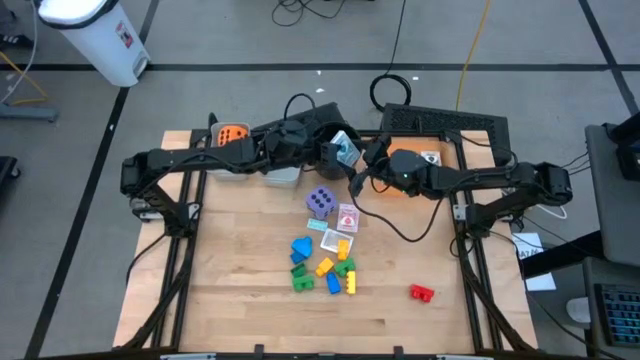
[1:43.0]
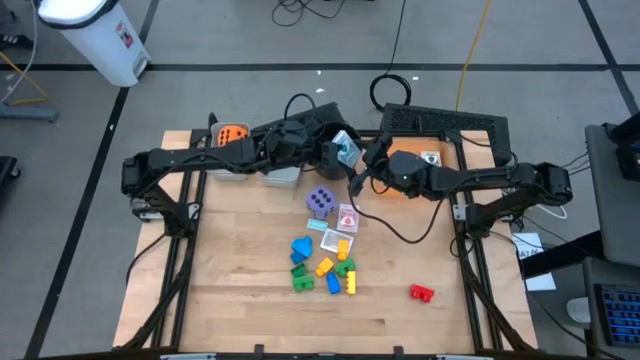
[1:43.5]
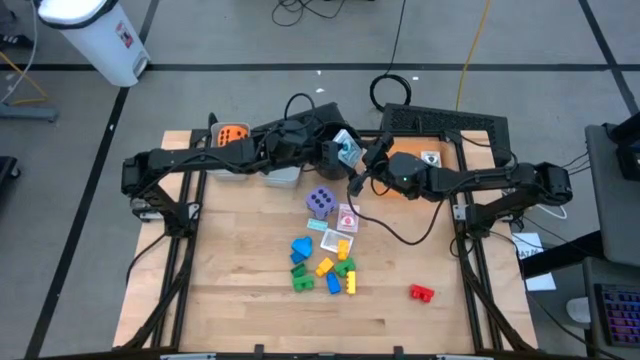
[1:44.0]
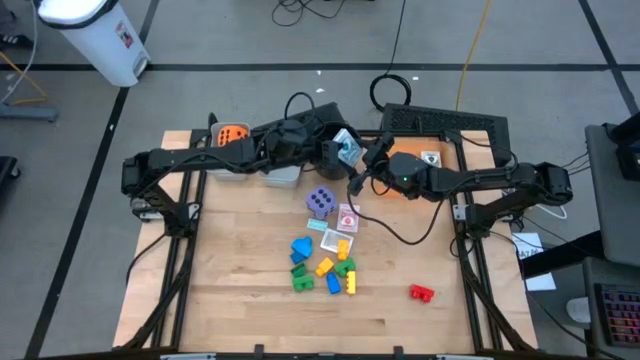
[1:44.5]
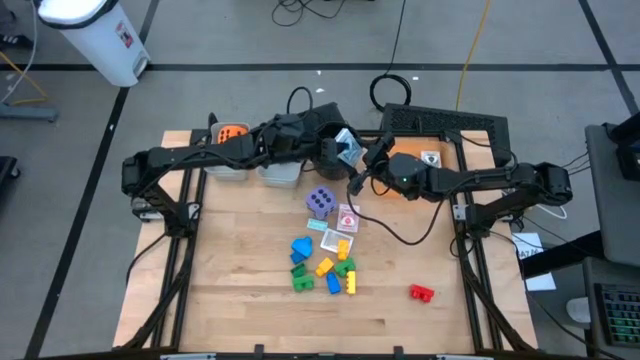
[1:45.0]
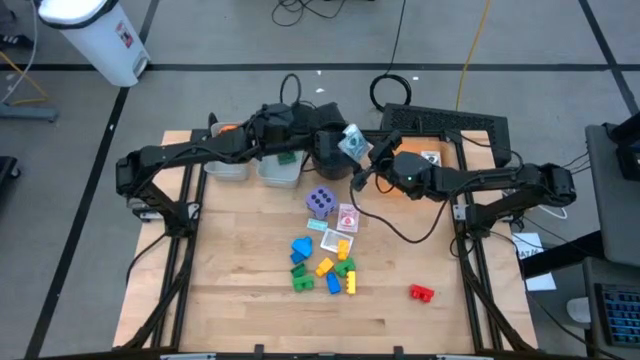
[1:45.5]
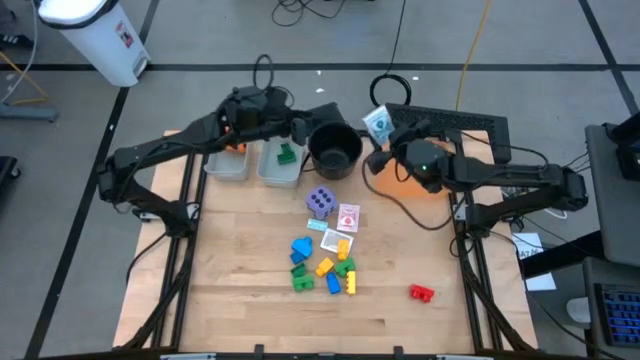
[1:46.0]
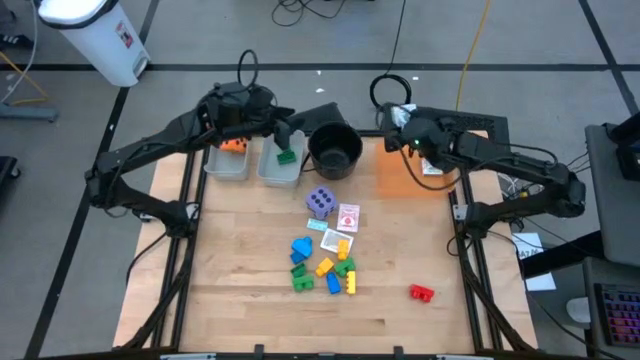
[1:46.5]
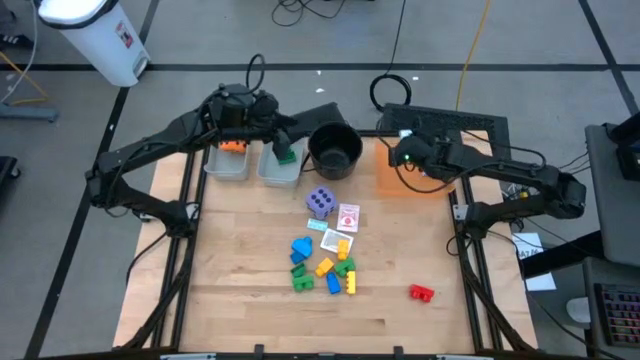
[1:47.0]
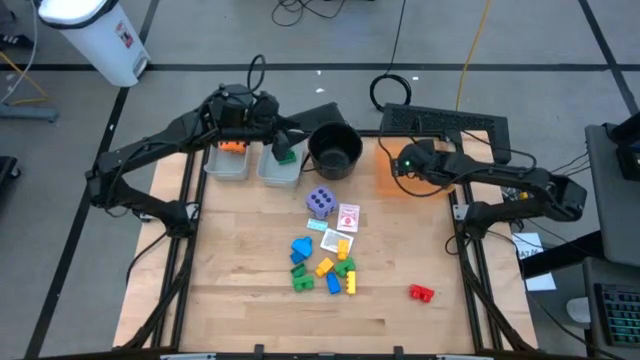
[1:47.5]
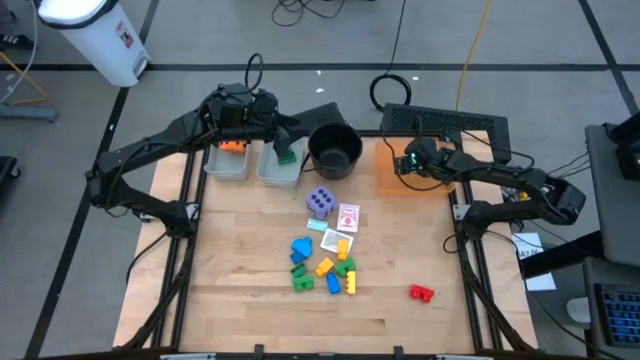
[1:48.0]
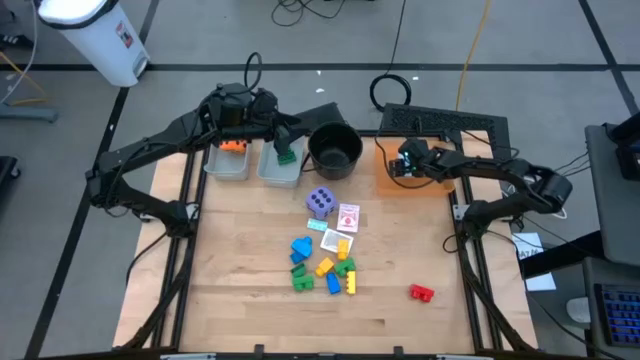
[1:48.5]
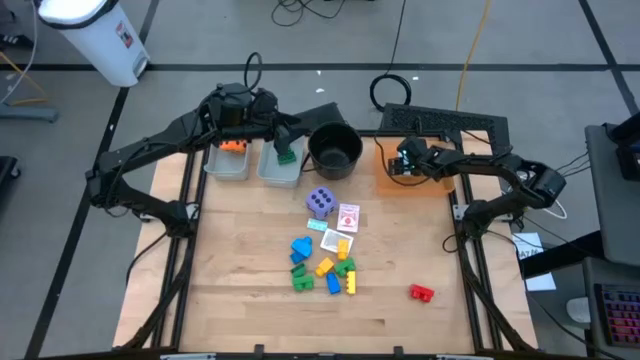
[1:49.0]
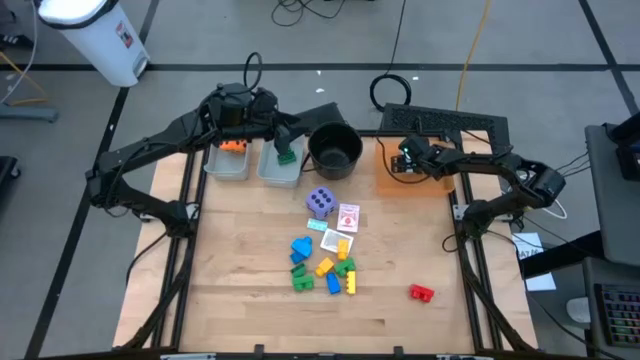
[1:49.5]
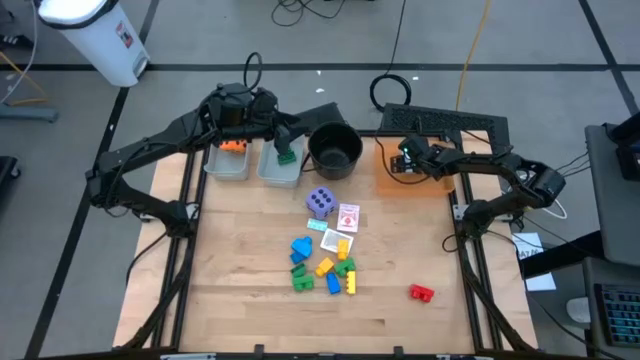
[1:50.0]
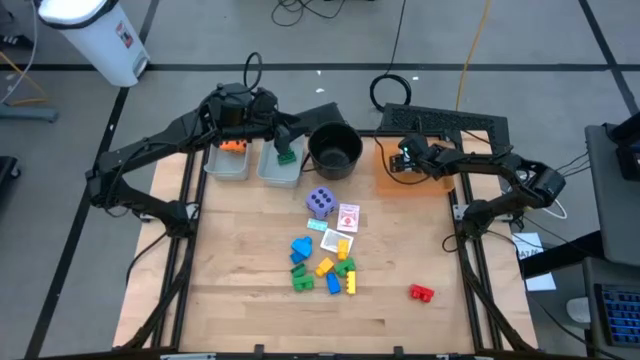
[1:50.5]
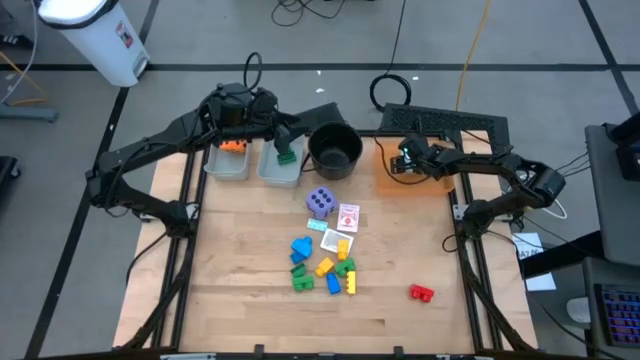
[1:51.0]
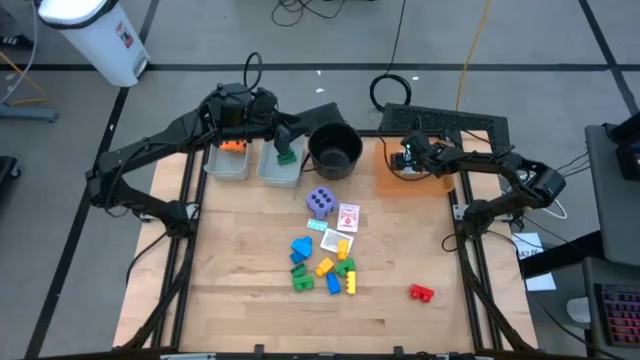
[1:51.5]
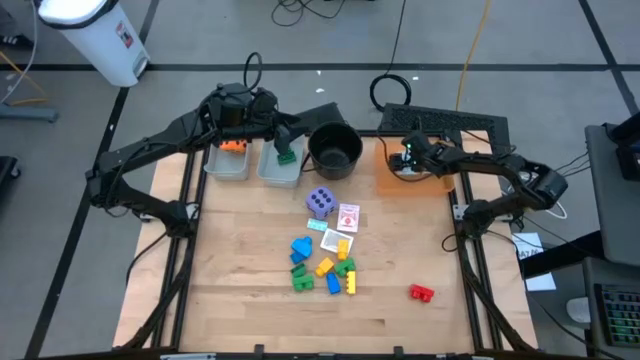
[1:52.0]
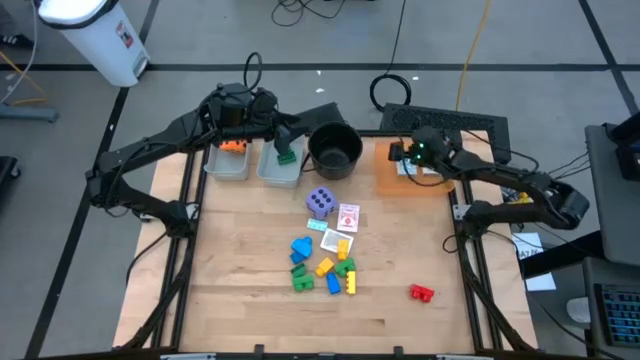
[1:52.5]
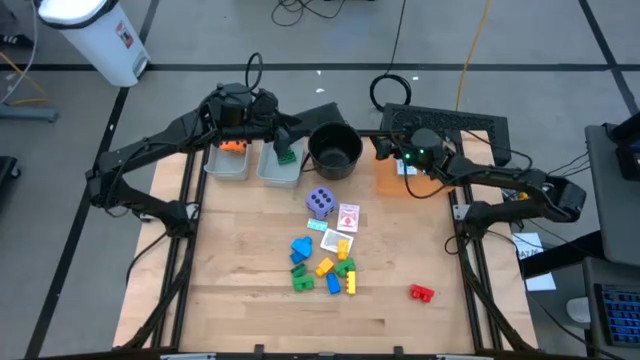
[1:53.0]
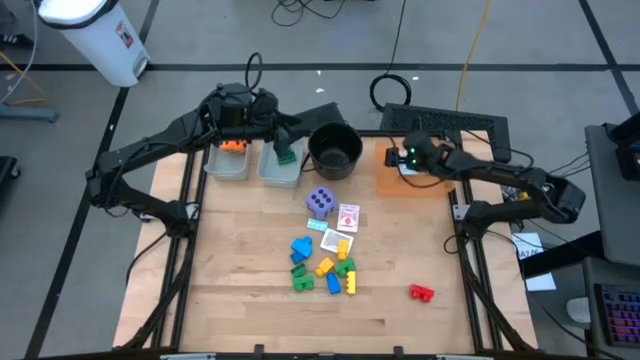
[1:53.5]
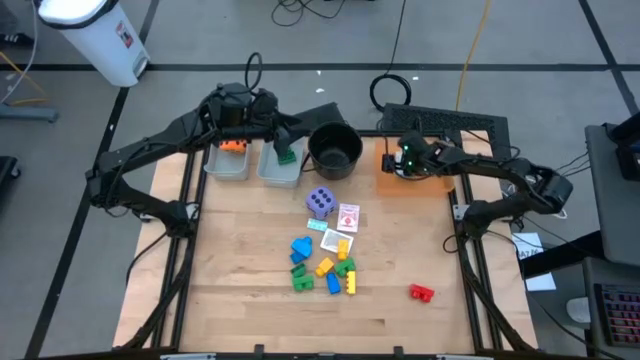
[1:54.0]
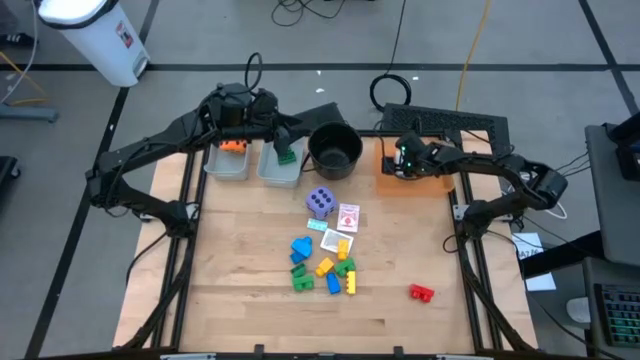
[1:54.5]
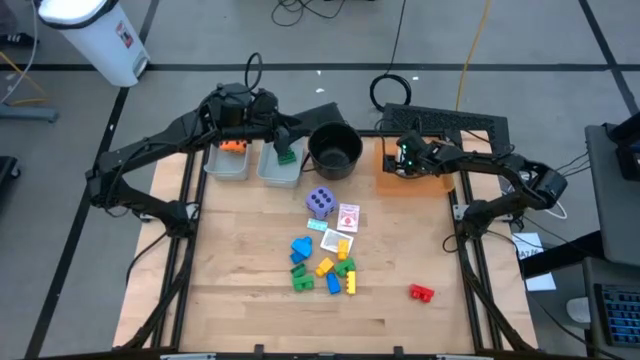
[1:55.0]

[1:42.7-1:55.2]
Task: Pick & Place Toys
Put the blue deck of cards into the orange bin

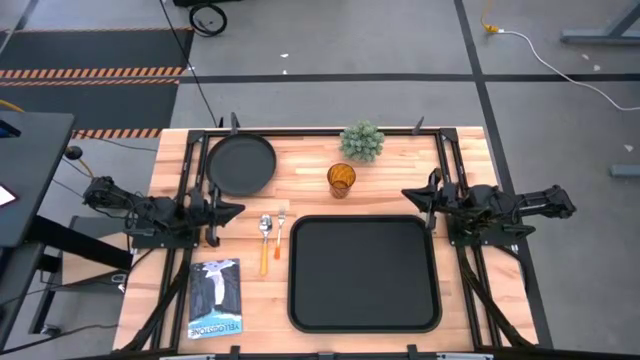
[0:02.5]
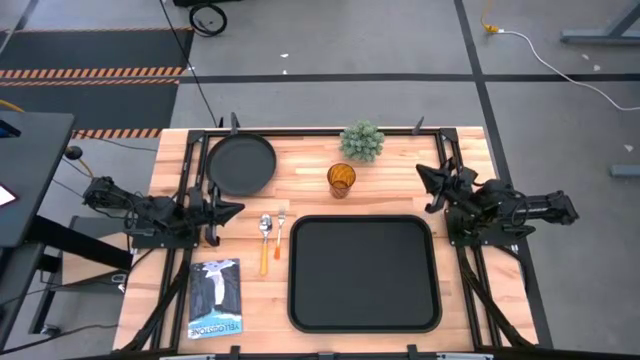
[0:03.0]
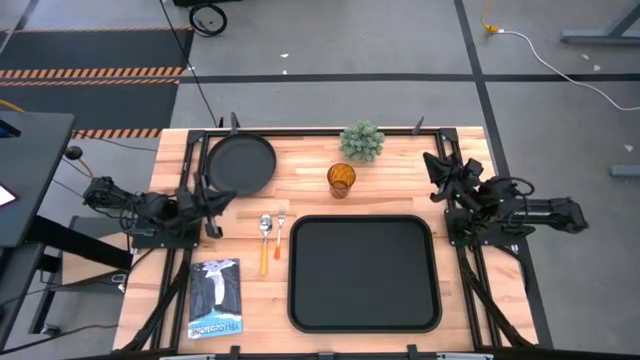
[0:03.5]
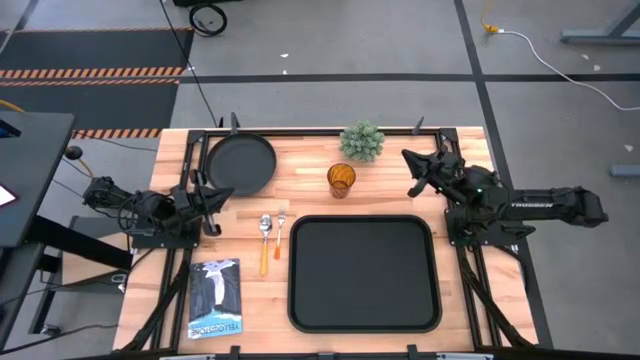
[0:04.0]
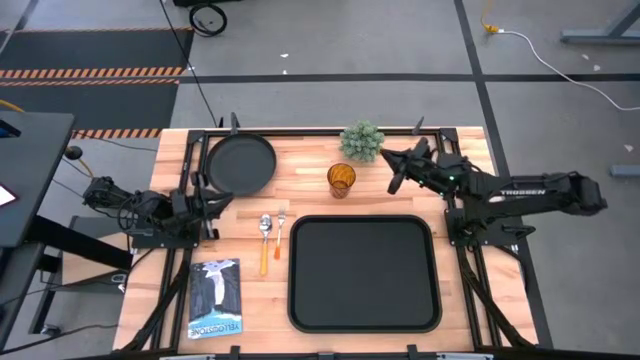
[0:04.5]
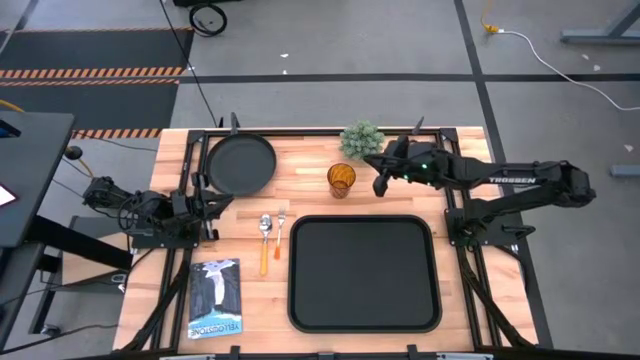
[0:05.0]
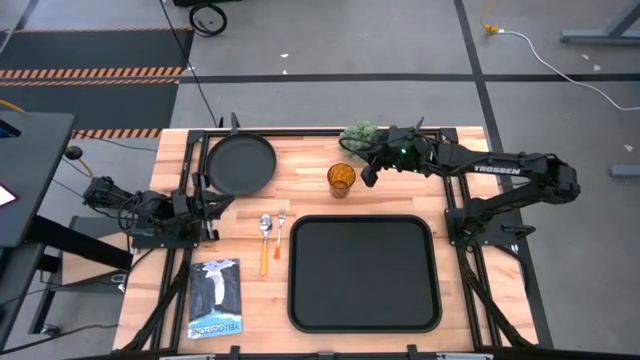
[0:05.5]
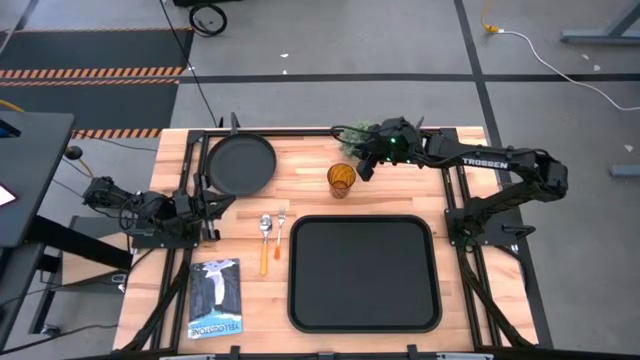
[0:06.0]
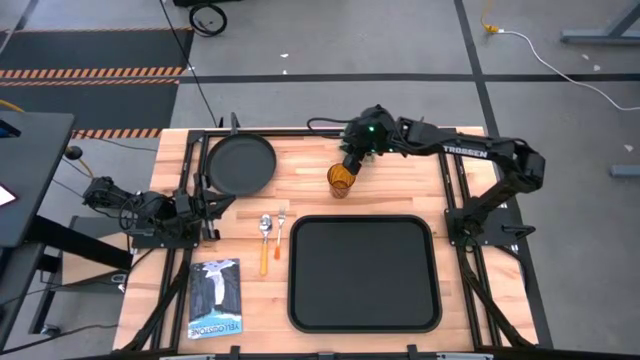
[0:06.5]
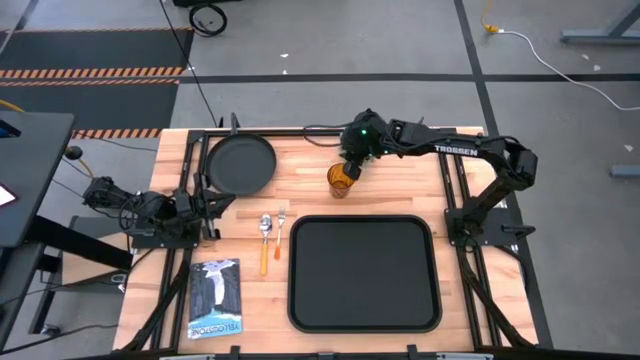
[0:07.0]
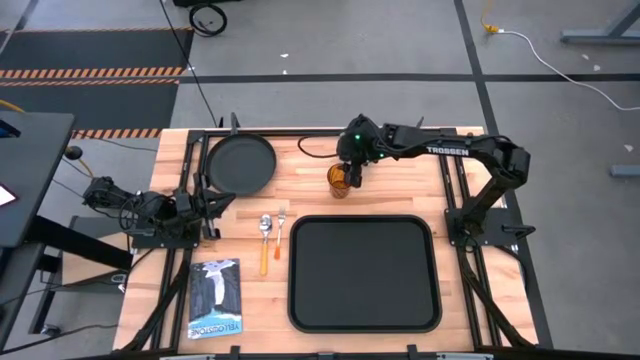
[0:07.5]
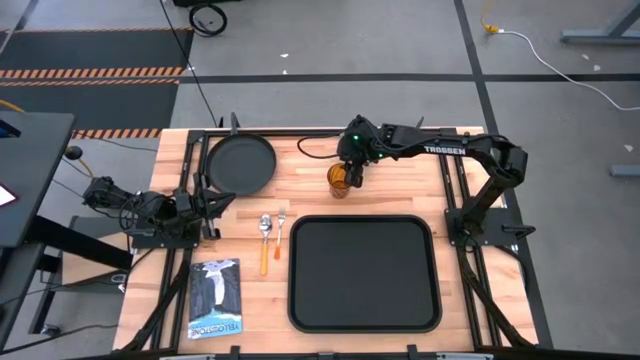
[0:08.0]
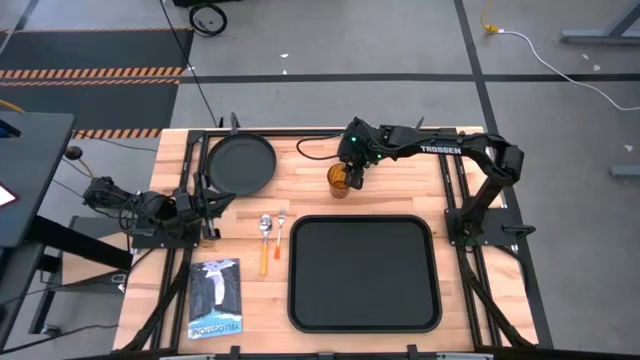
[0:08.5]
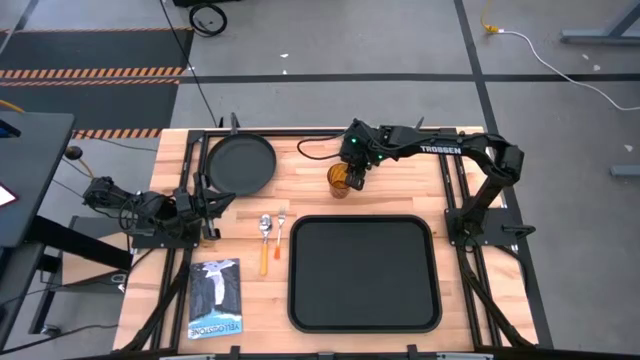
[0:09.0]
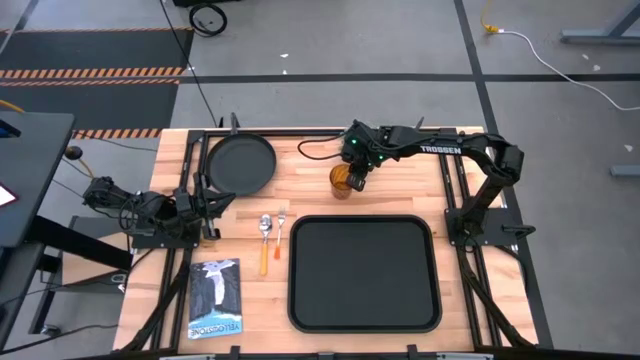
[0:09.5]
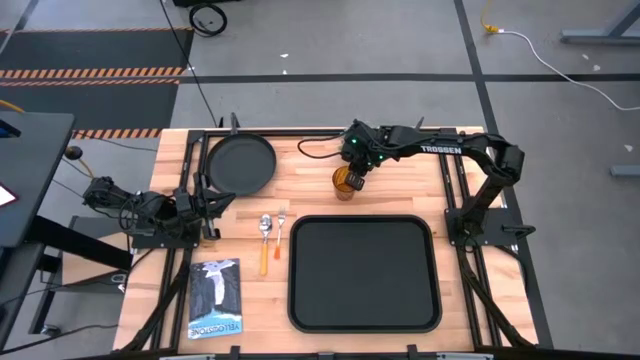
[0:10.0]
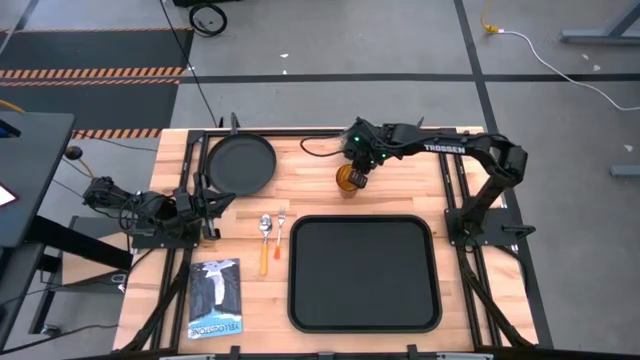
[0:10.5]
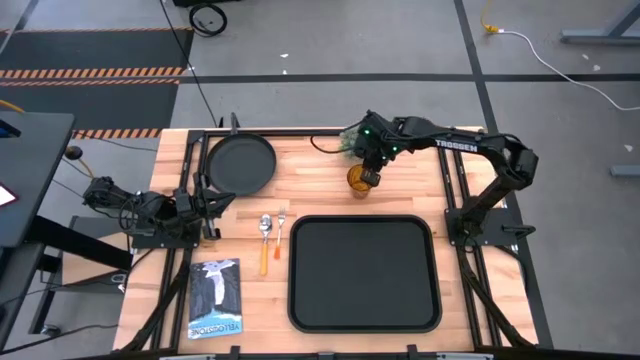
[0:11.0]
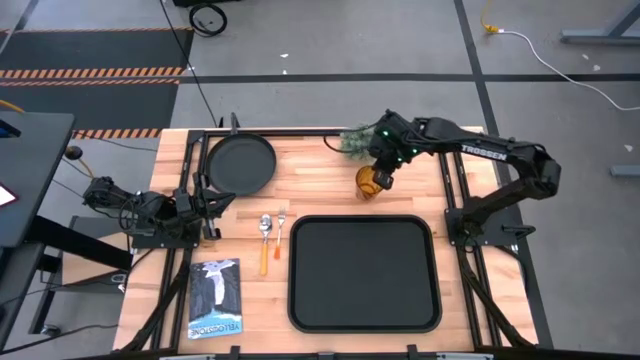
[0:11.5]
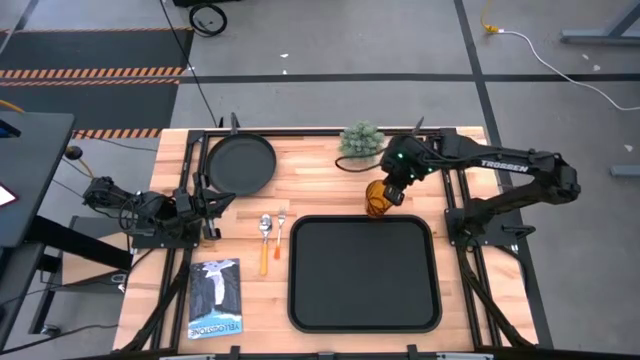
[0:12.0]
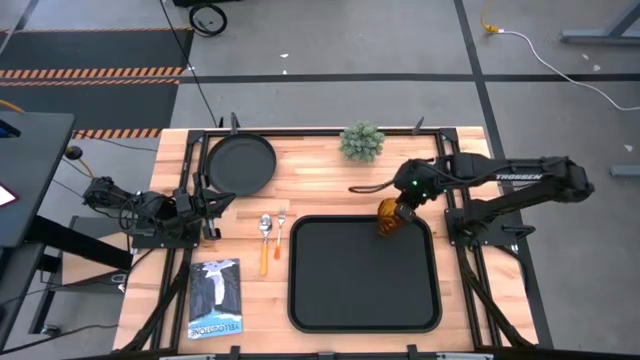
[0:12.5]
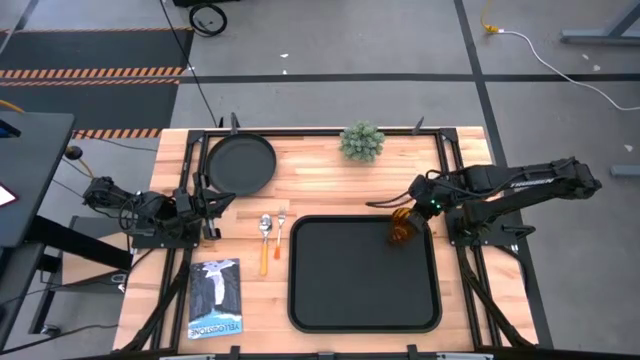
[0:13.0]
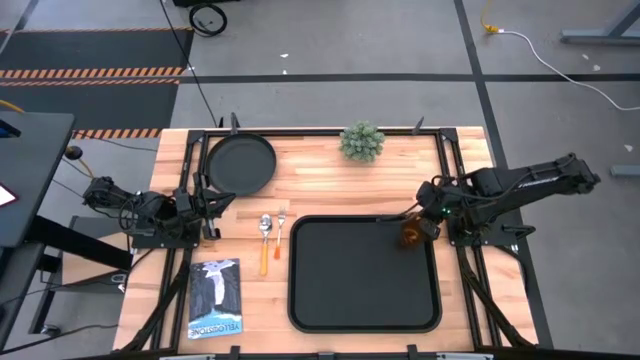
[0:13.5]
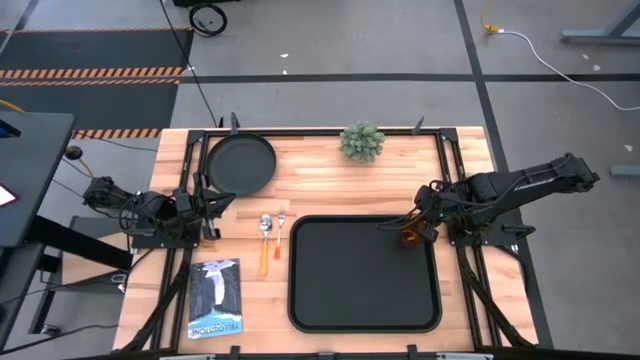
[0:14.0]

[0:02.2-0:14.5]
Task: Pick and place plate/cup/fork/spoon on tray
Put the brown cup on the black tray
